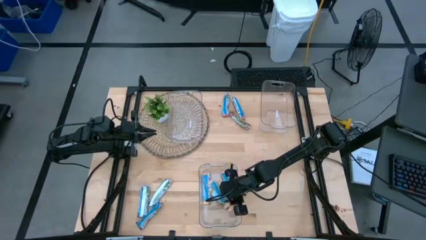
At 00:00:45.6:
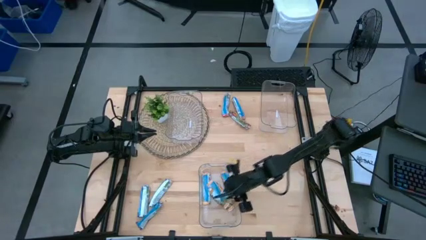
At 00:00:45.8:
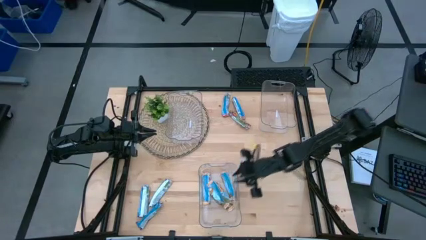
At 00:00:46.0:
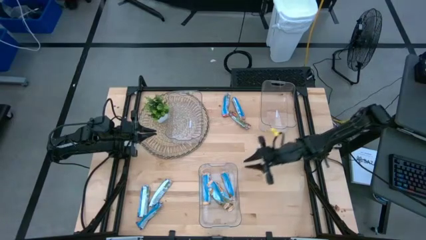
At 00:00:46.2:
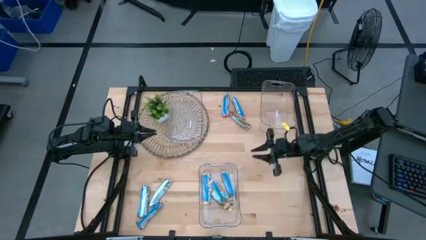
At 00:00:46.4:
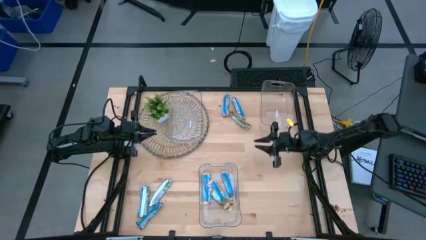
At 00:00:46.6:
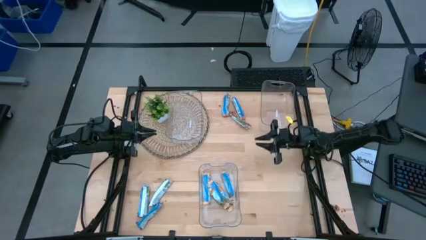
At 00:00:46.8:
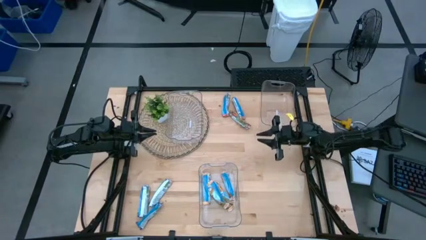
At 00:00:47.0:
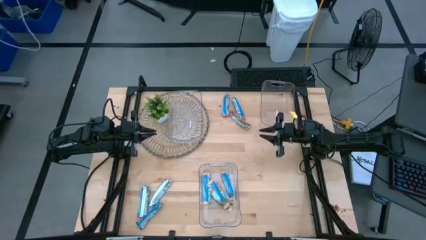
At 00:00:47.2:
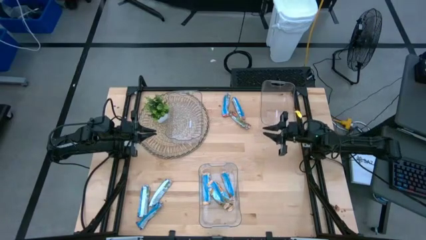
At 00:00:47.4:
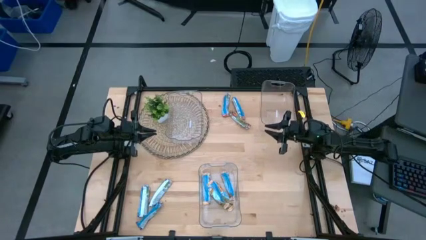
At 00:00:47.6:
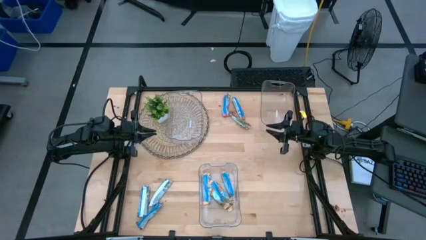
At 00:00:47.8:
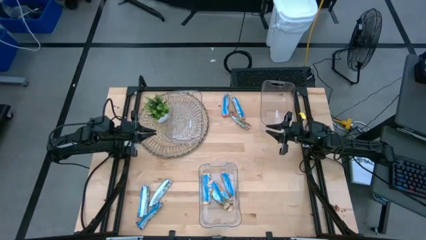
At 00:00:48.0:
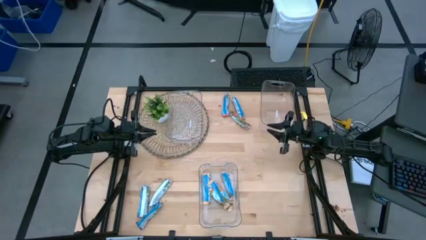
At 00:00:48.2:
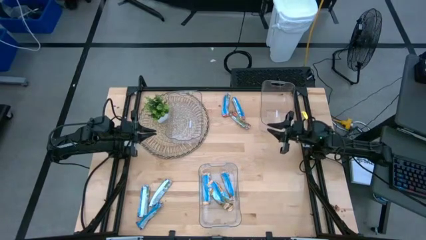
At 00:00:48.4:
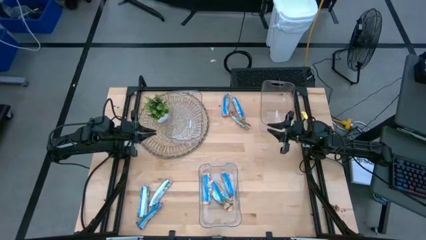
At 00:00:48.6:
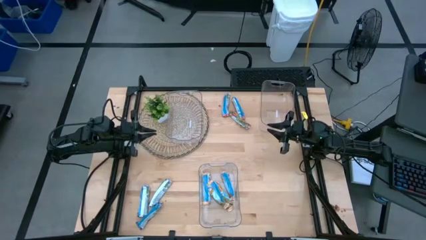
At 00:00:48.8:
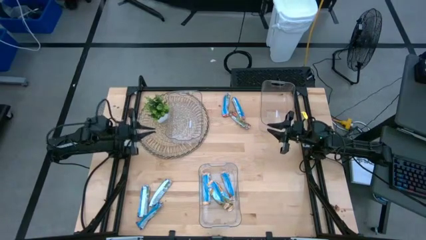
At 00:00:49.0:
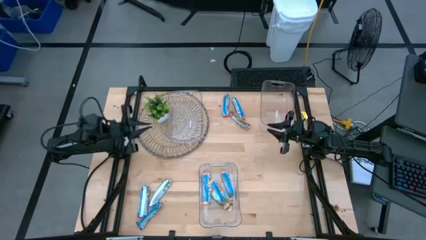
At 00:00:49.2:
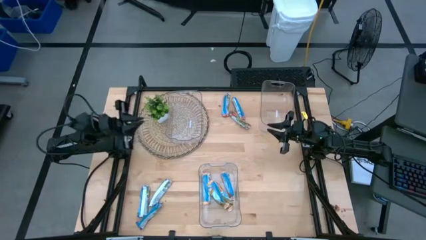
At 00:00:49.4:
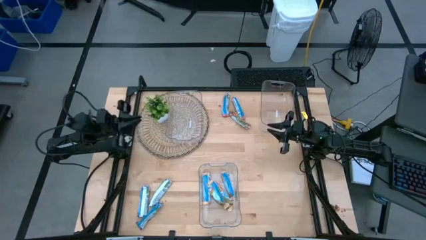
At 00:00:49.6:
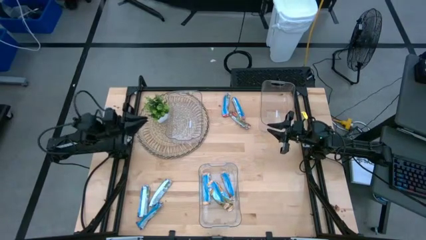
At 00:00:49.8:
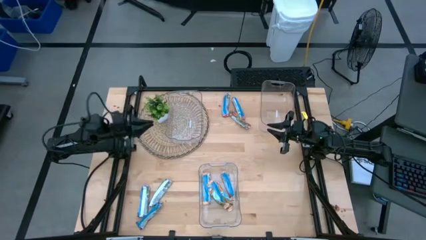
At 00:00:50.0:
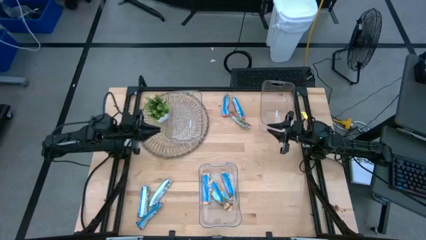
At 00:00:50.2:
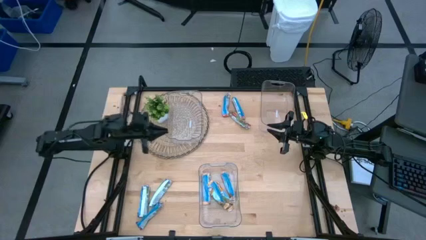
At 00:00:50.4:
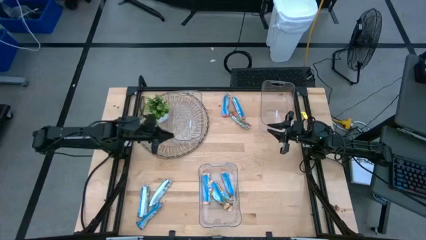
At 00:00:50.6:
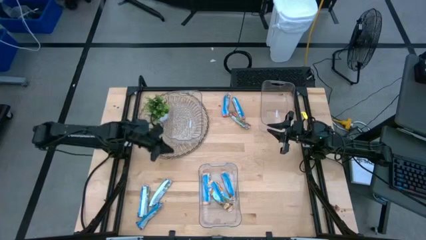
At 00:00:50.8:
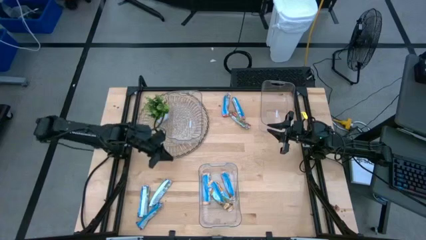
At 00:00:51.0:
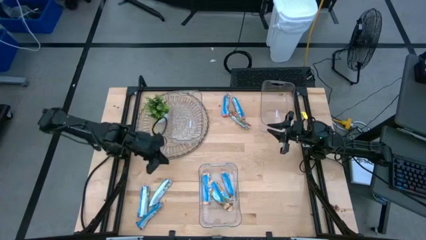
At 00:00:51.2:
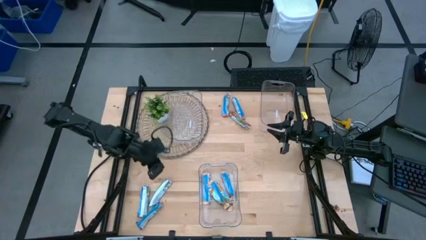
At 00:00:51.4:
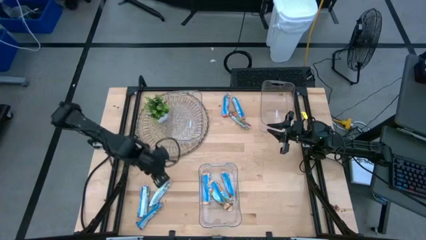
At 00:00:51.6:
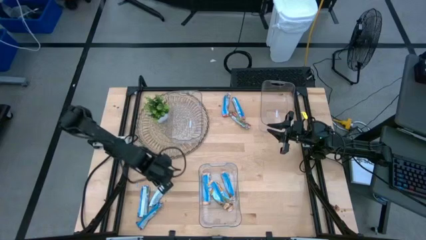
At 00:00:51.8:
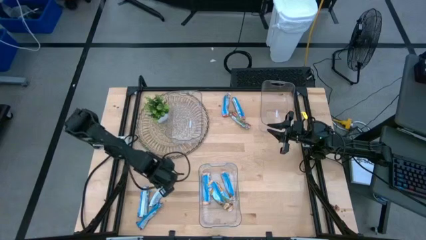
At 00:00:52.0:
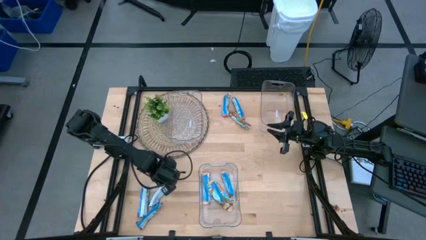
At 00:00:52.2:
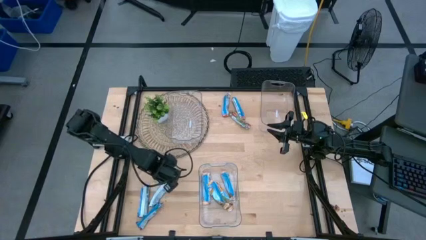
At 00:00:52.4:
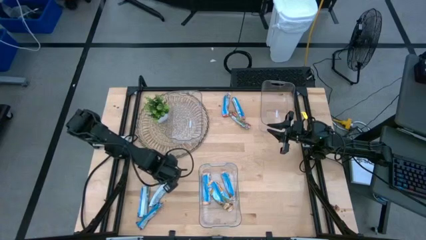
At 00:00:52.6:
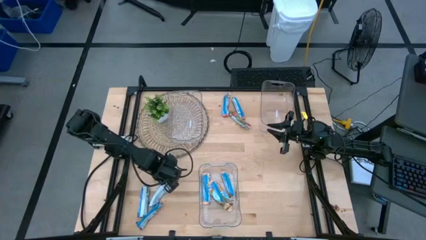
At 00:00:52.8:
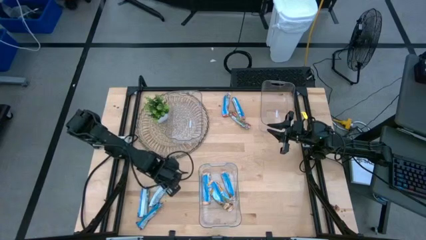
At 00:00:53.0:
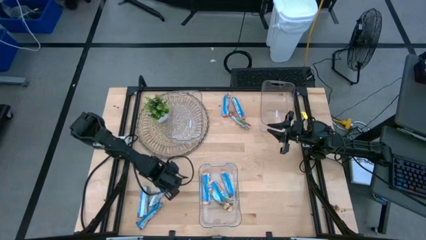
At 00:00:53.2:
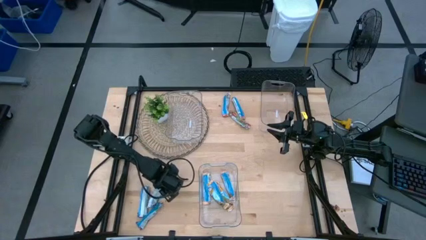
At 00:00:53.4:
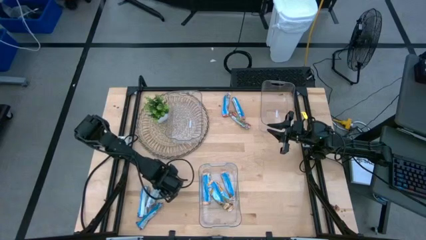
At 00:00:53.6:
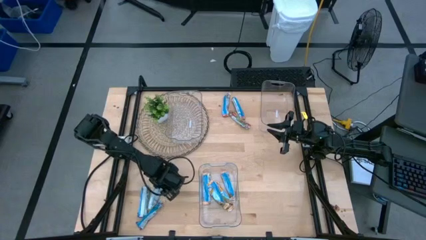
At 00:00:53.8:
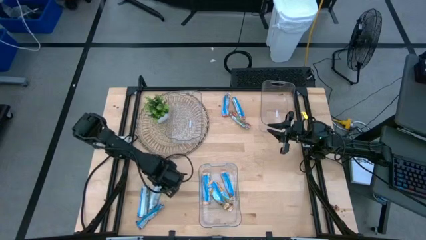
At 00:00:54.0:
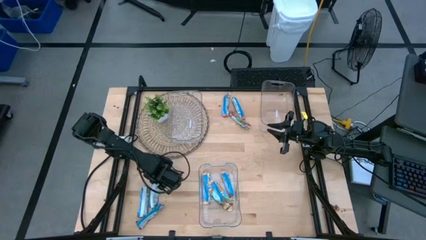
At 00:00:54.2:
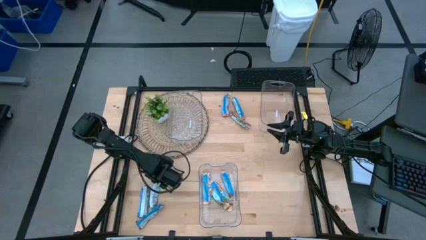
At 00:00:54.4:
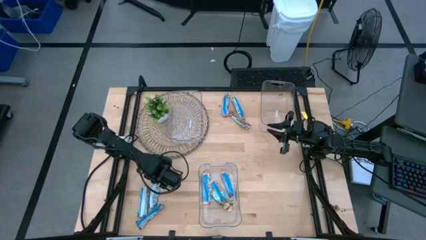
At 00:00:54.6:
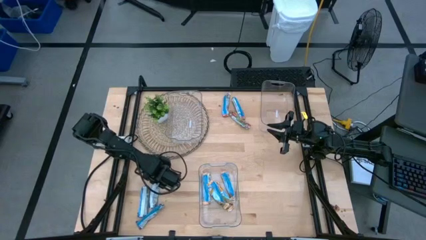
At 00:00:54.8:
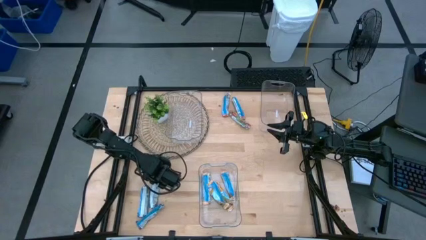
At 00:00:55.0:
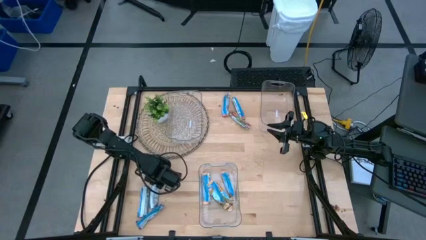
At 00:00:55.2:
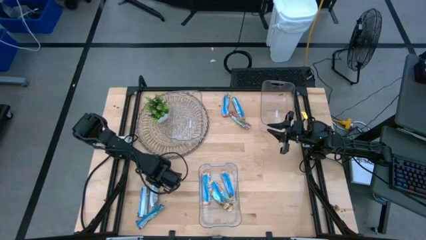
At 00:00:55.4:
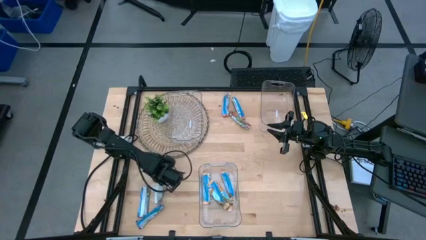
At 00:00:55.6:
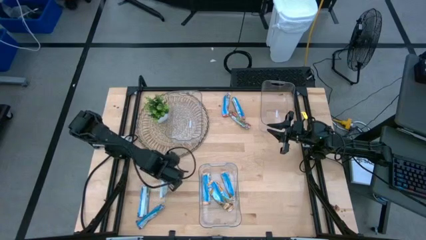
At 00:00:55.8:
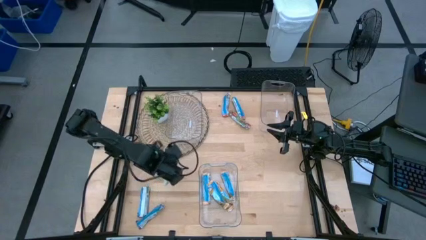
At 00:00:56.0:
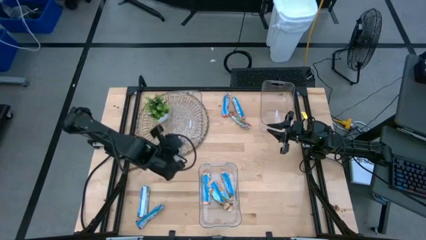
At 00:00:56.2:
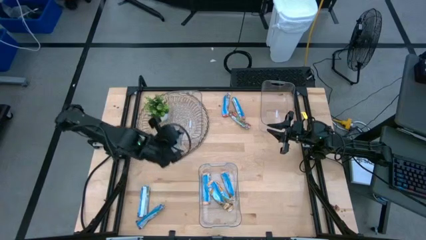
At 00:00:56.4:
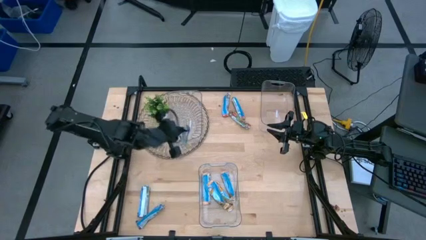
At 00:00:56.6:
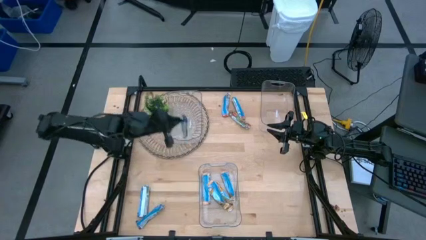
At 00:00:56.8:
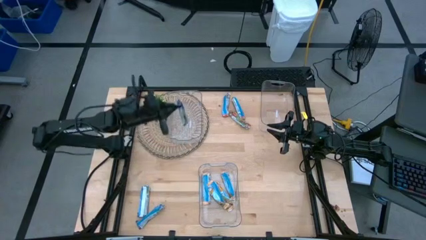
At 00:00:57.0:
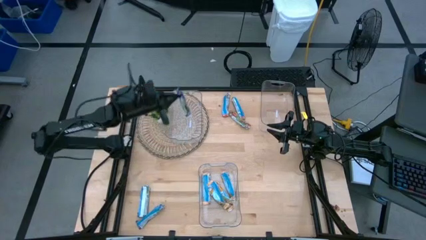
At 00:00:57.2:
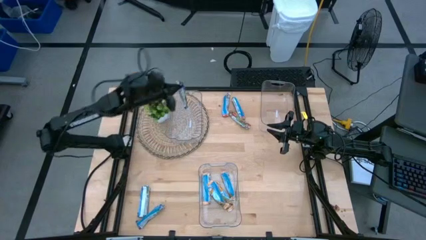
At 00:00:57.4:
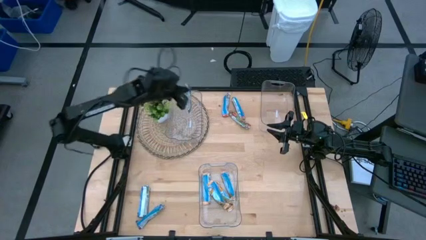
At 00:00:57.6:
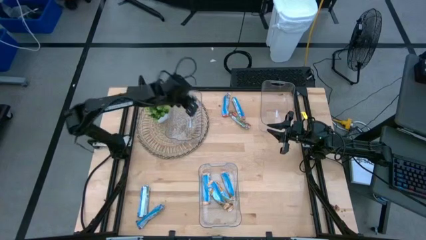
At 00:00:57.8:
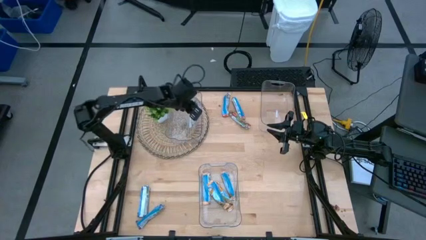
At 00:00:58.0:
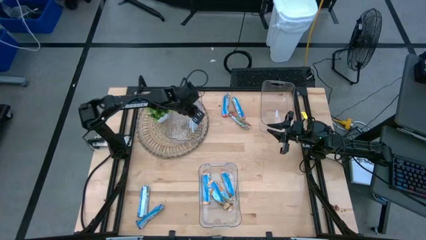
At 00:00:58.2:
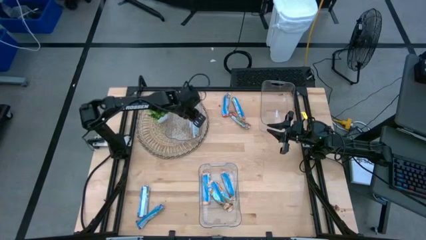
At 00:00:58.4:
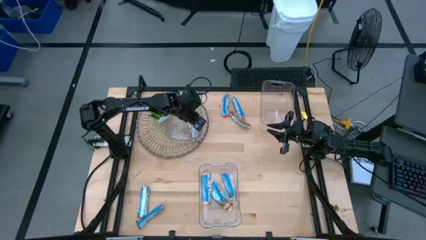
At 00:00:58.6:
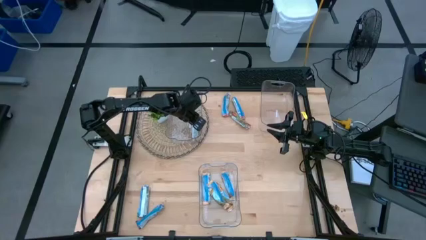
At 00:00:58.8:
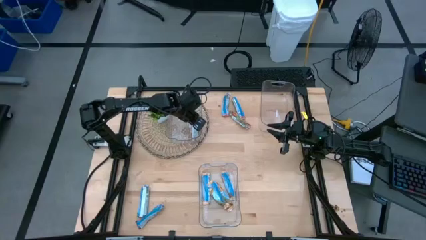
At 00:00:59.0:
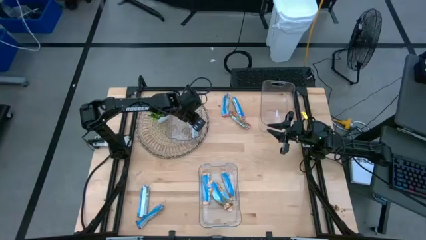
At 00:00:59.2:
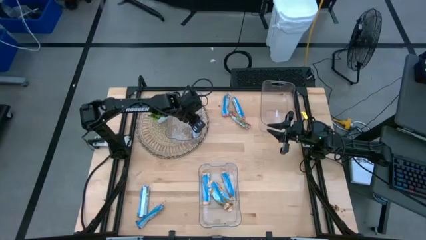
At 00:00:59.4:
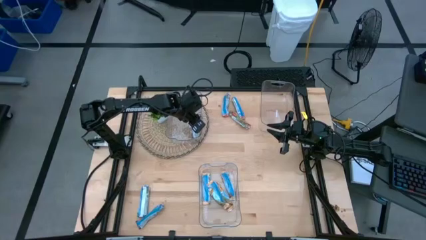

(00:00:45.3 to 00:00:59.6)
Task: Pick and place Granola Bars by type
Put the blue granola bar into the top left transparent bin
